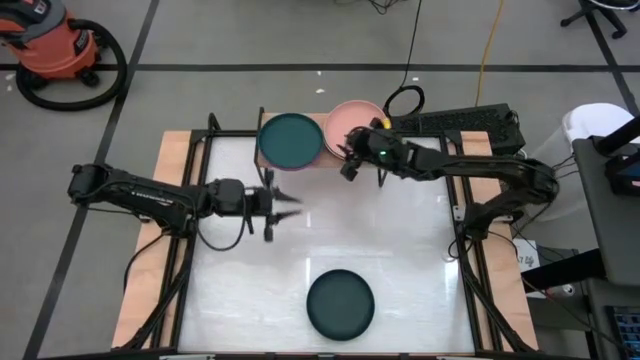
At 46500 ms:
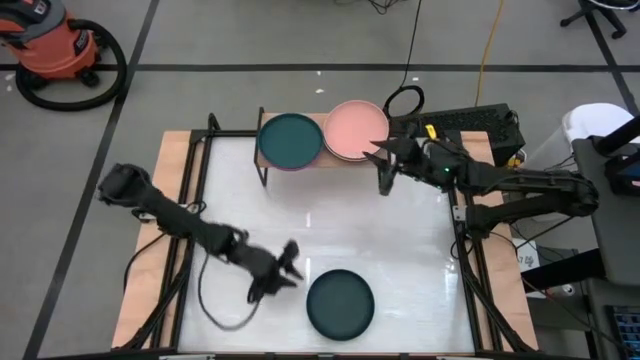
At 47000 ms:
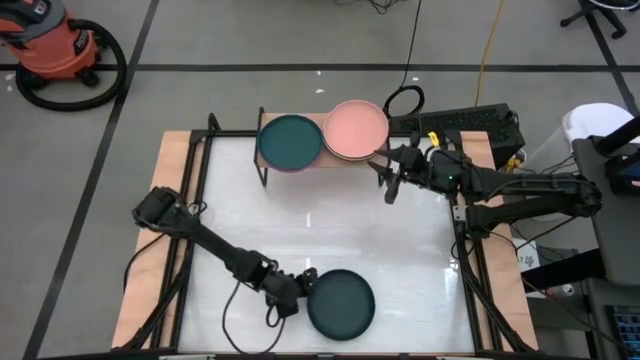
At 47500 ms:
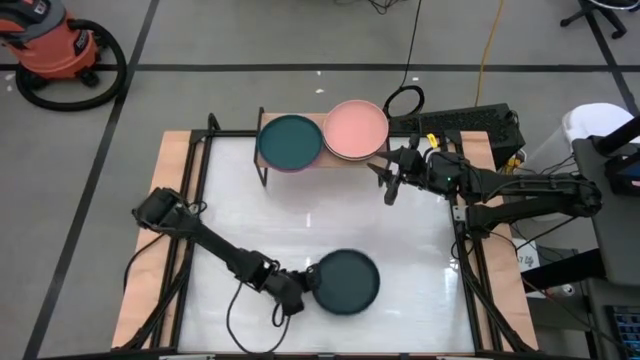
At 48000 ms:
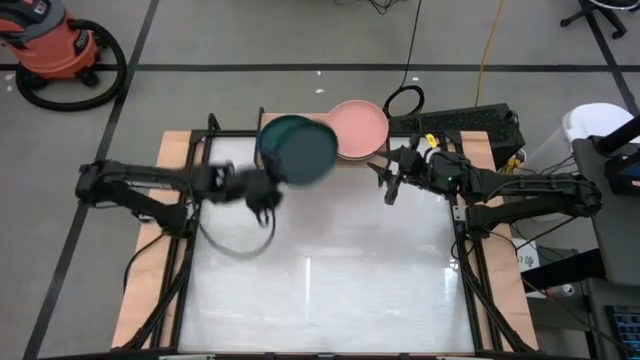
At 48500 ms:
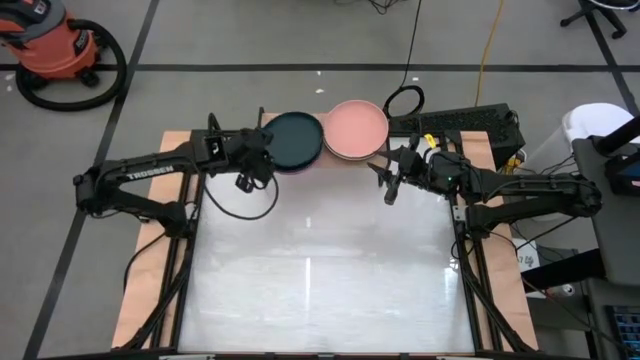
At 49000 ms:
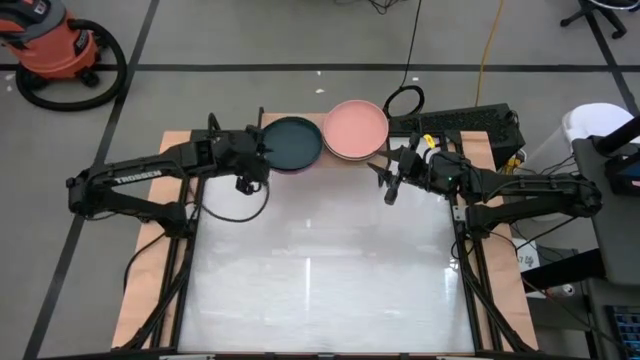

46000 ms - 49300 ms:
Task: Place and stack plates onto a shelf
Stack the black plate on top of the green plate on the shelf

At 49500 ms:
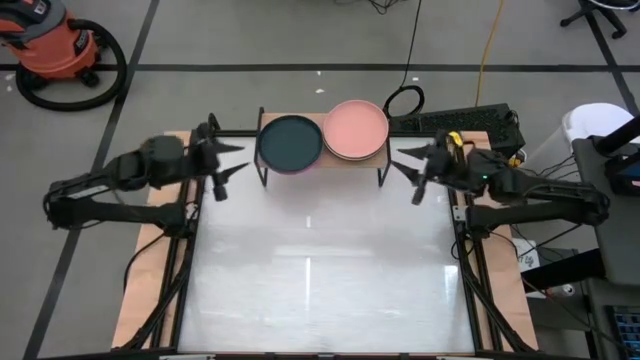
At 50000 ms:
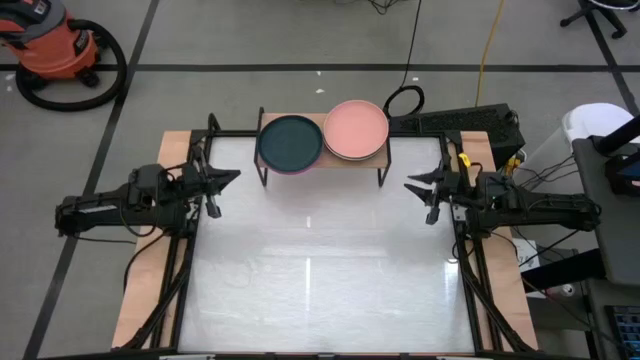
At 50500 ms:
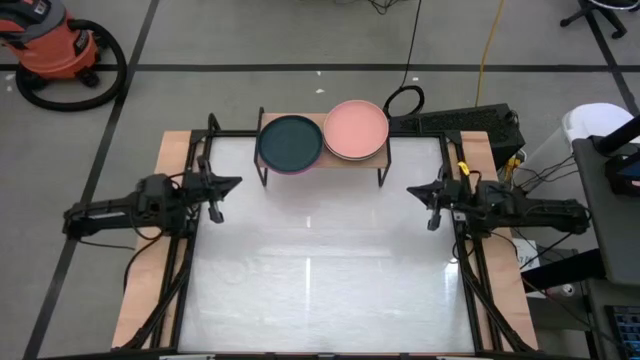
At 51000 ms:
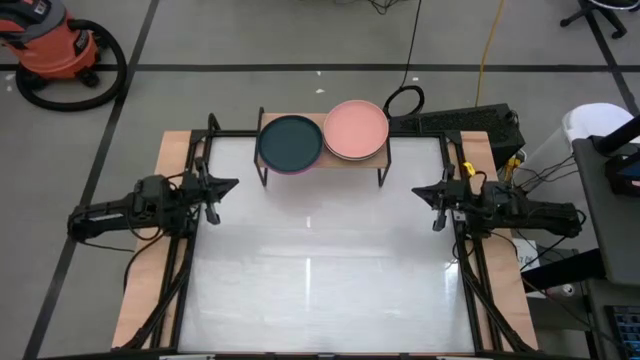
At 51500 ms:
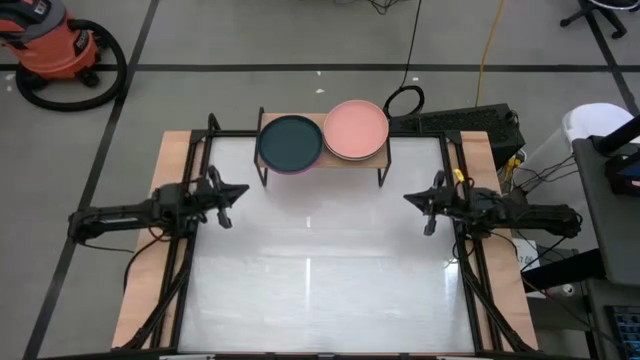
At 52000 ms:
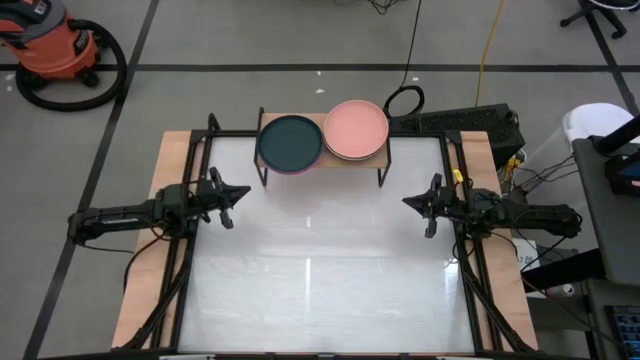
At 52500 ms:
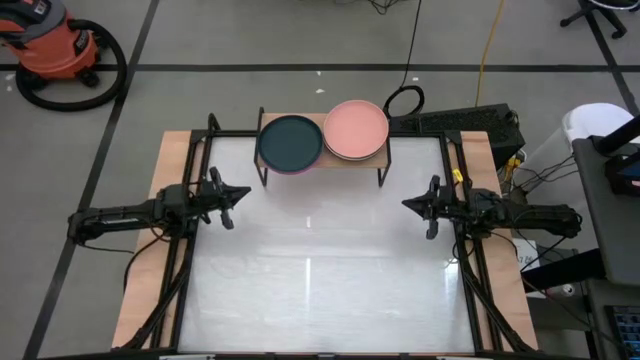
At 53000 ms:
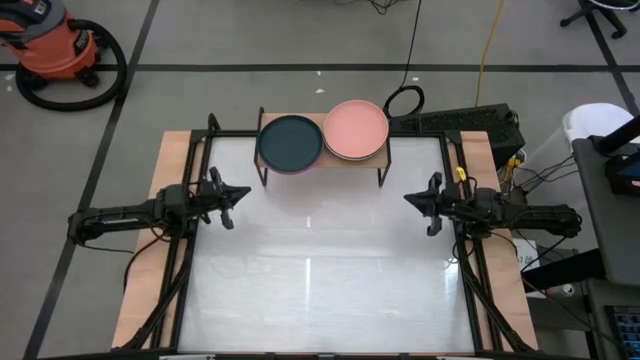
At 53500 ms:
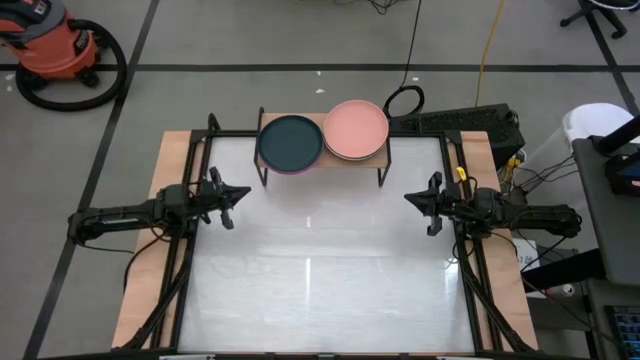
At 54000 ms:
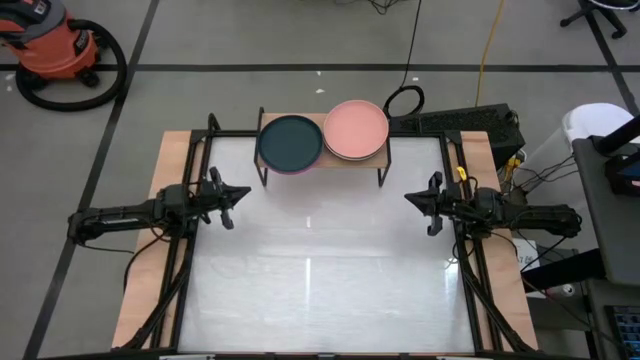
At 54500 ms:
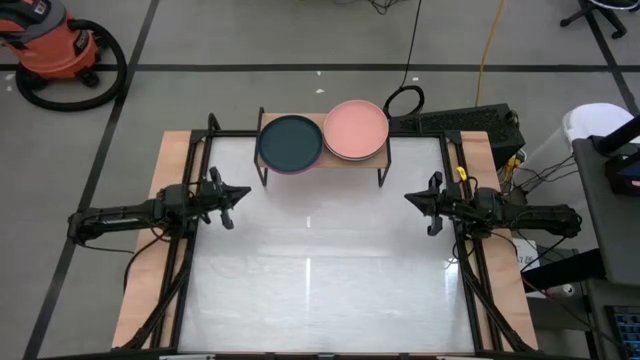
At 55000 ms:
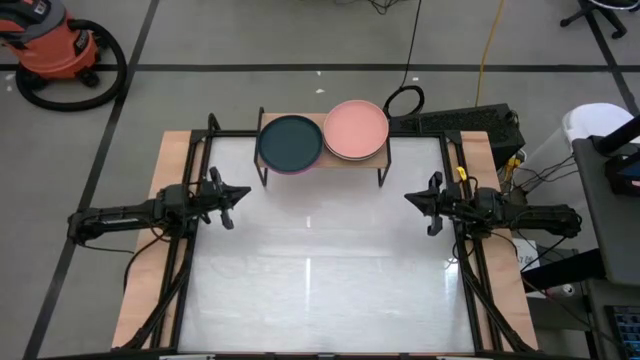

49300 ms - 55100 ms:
Return to Home Position

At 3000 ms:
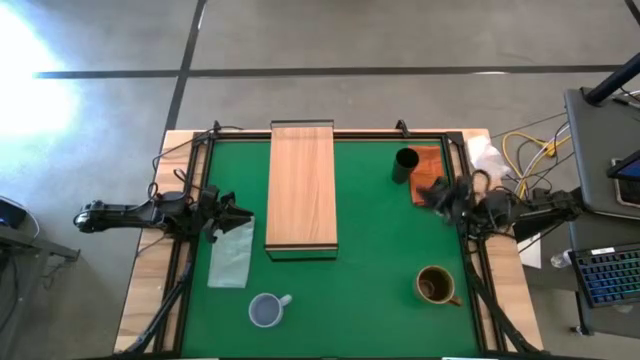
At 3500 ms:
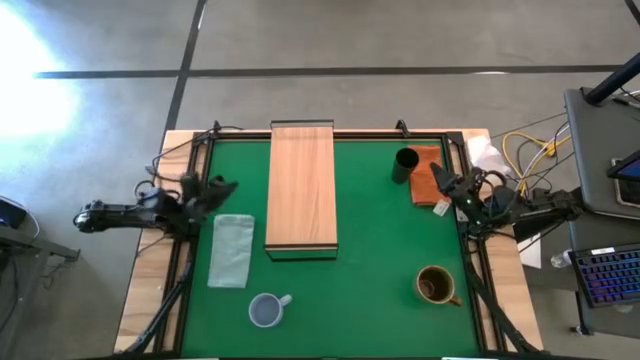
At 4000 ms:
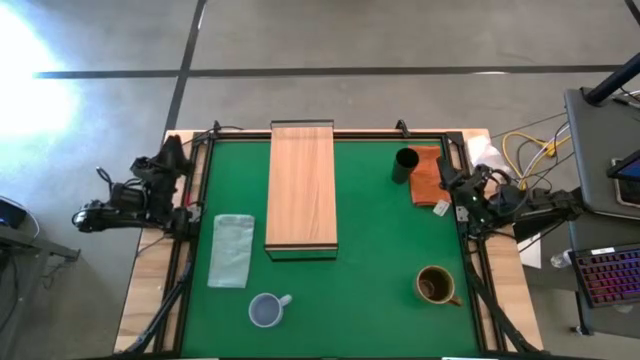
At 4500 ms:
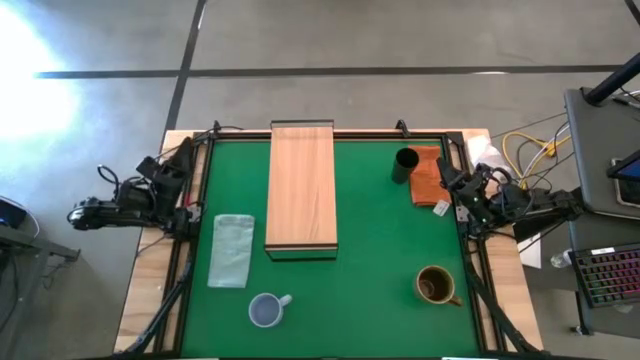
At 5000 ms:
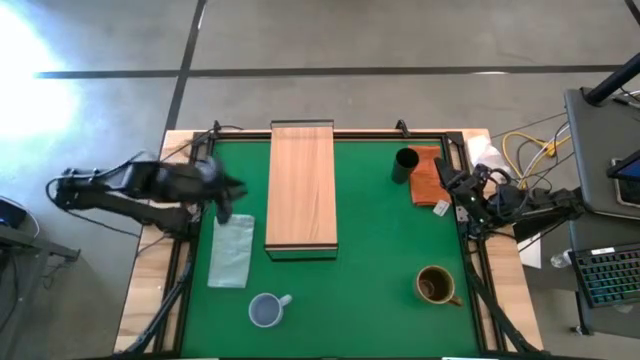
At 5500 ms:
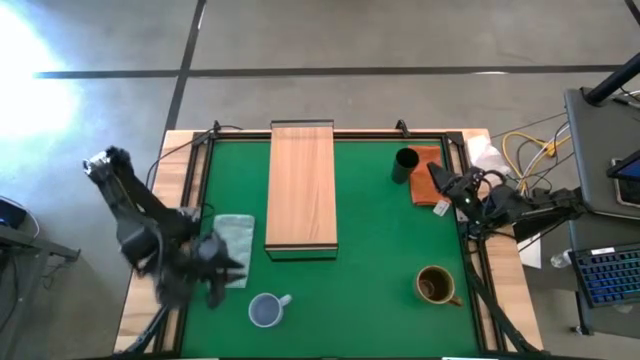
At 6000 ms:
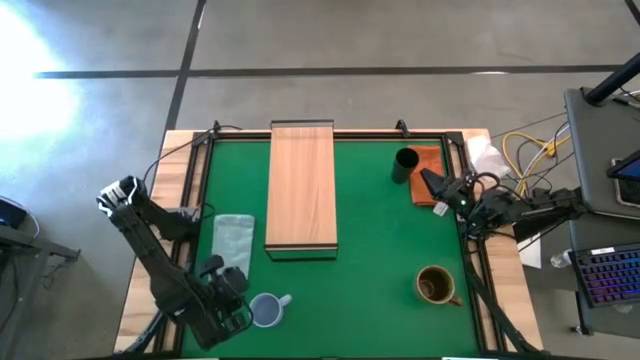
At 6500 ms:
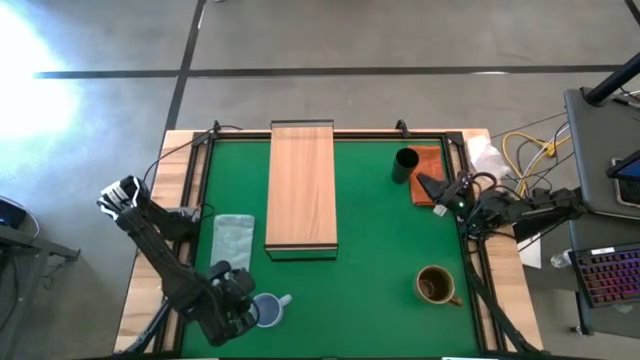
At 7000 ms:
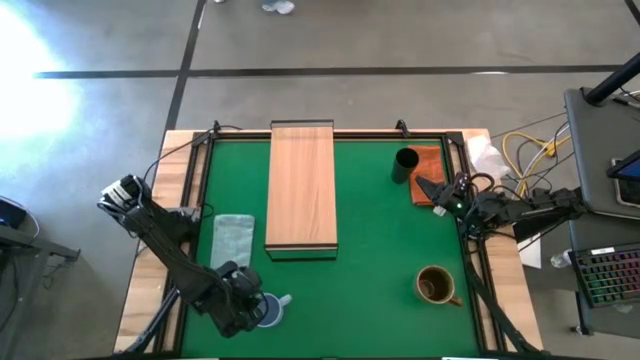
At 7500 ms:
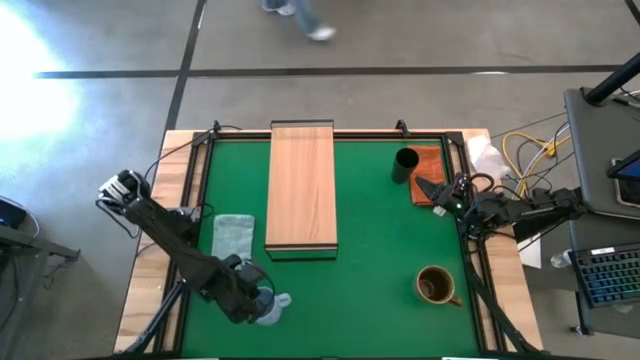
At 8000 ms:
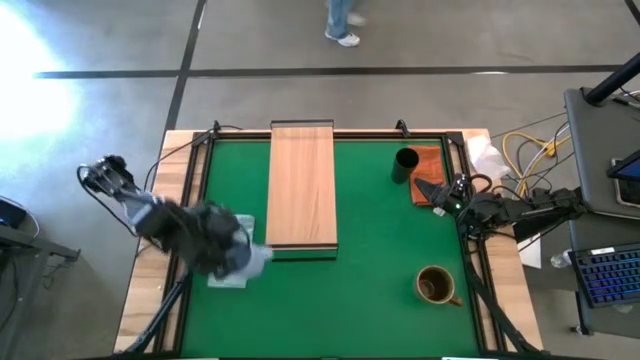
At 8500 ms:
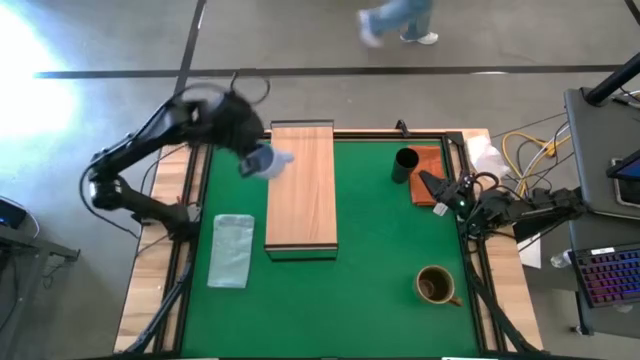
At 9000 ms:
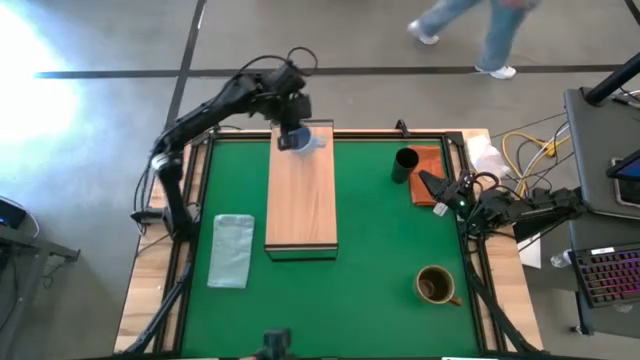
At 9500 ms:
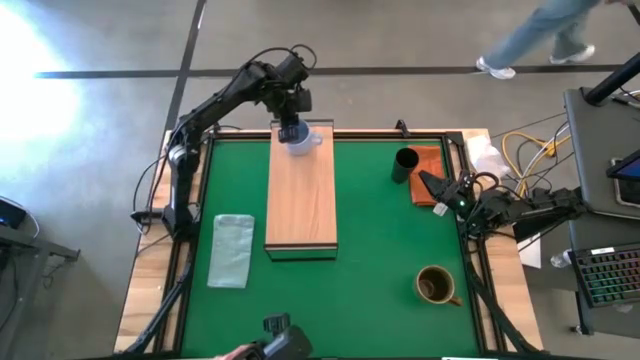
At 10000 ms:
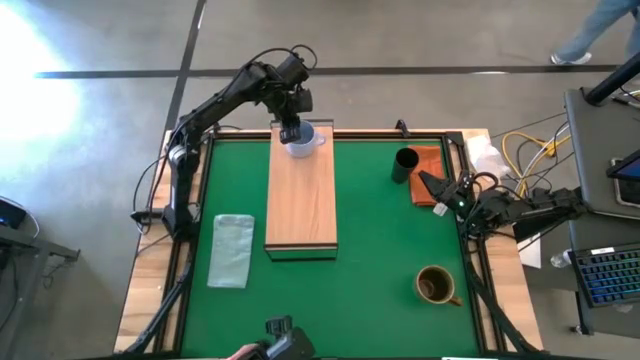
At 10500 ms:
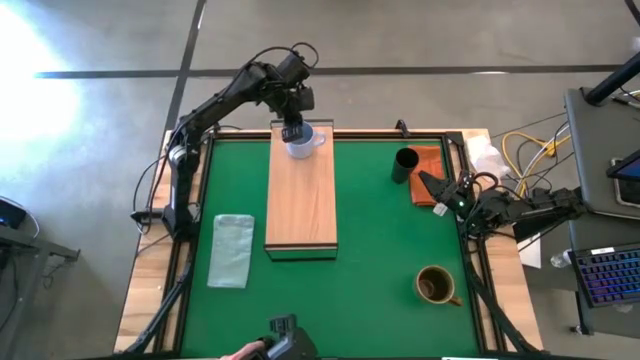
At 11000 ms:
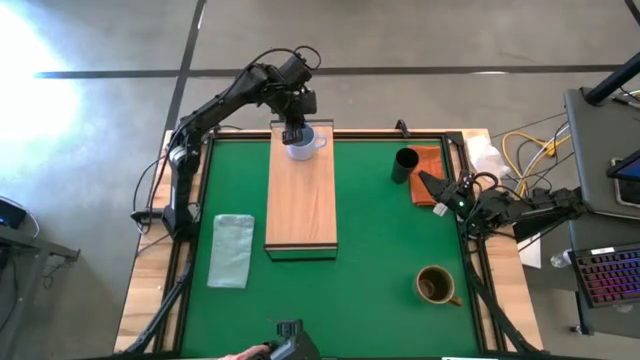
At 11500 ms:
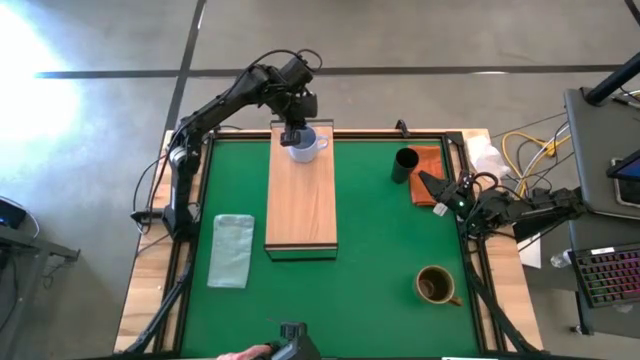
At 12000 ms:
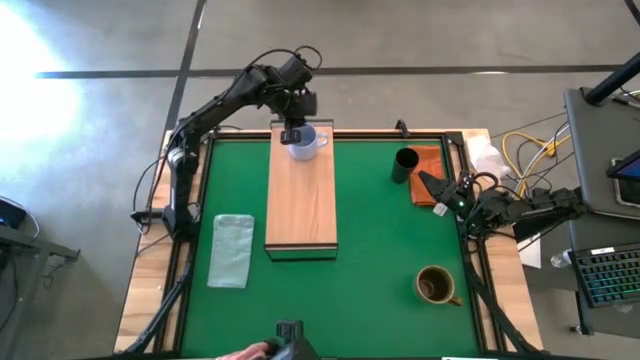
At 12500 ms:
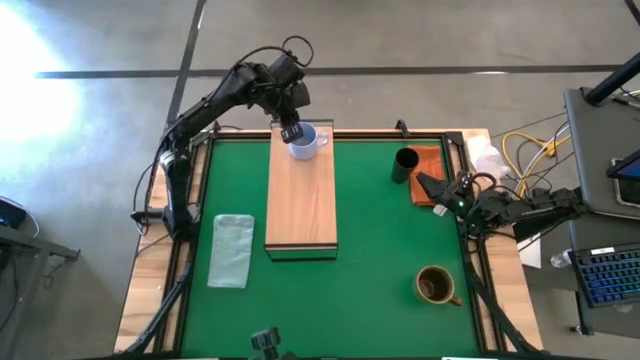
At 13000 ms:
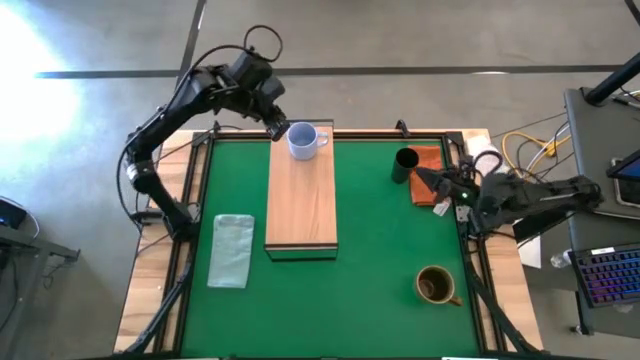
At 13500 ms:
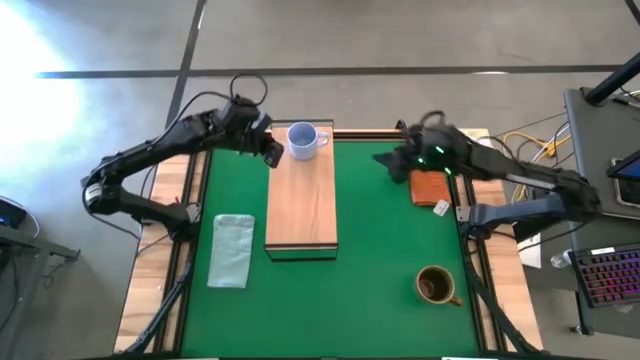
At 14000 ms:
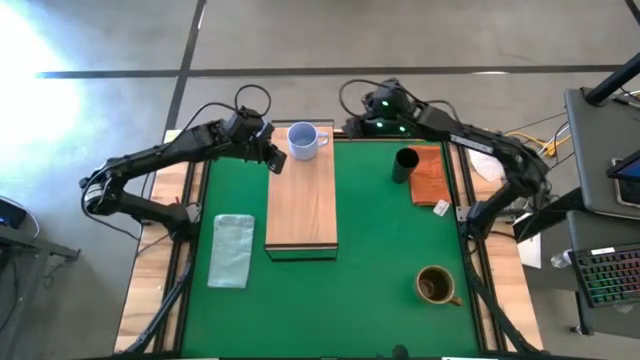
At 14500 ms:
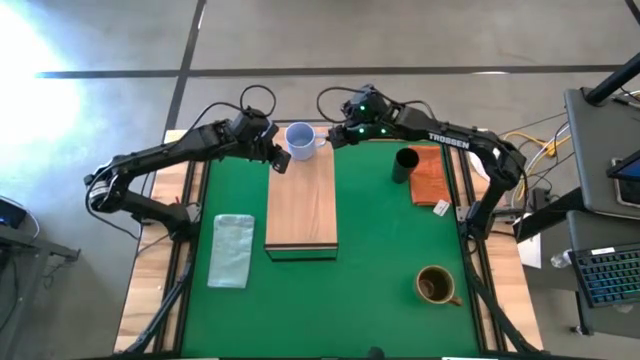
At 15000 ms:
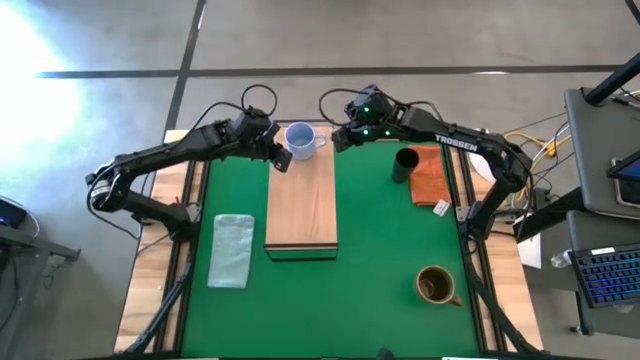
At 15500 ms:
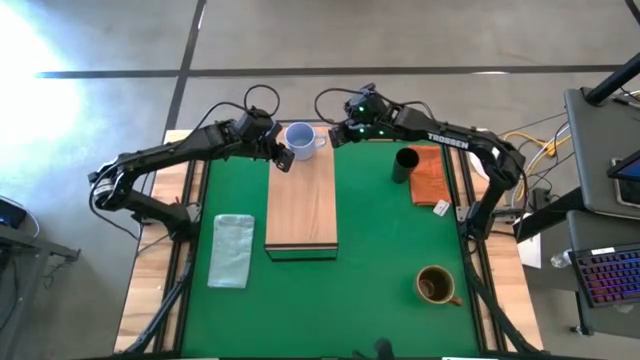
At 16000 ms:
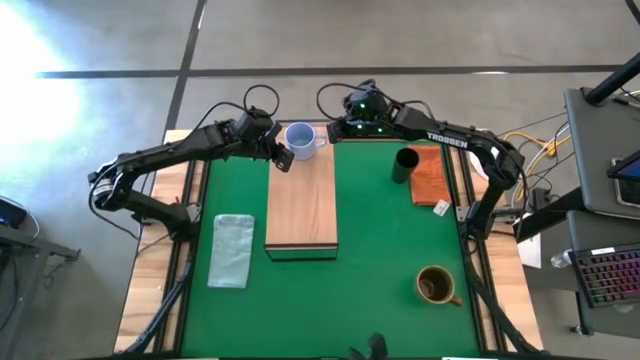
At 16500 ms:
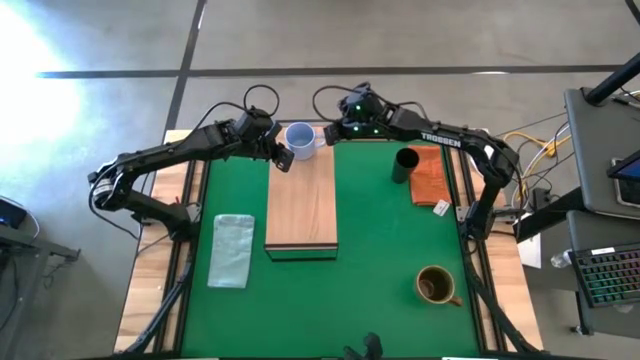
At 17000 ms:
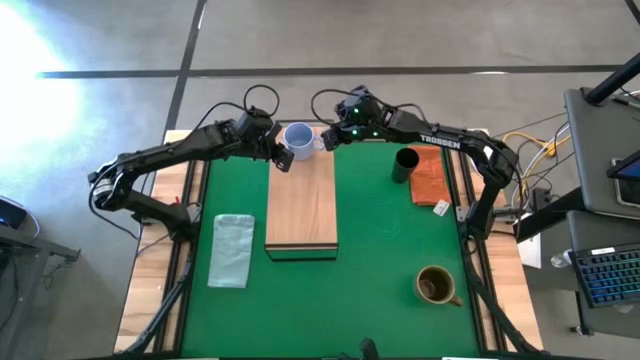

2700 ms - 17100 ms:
Task: Stack small to large cups/mugs on shelf
Put the blue mug on the shelf
